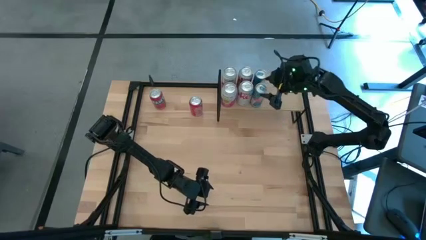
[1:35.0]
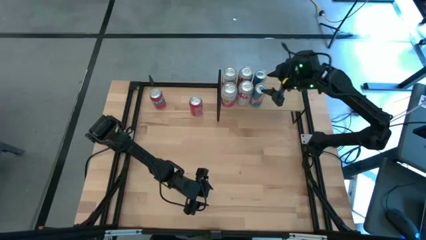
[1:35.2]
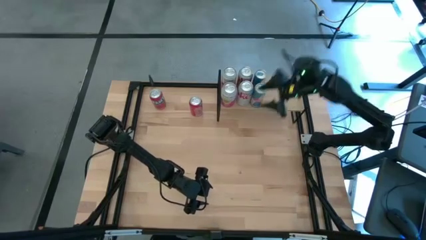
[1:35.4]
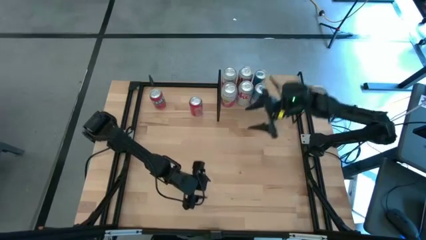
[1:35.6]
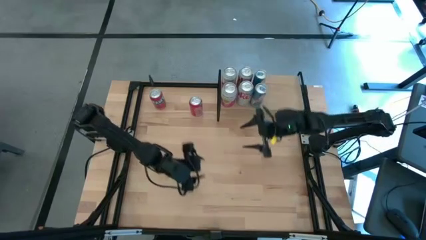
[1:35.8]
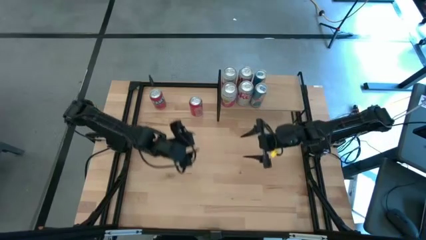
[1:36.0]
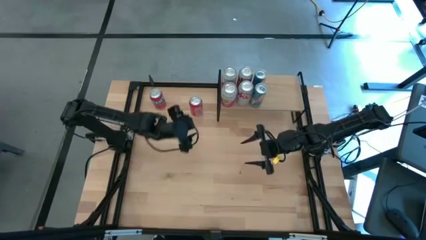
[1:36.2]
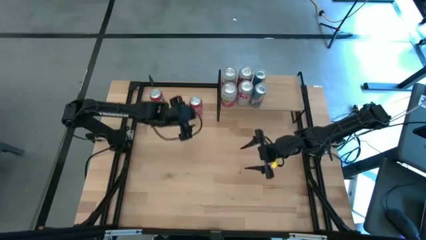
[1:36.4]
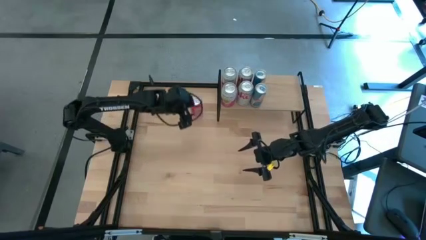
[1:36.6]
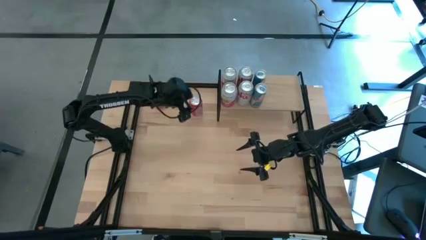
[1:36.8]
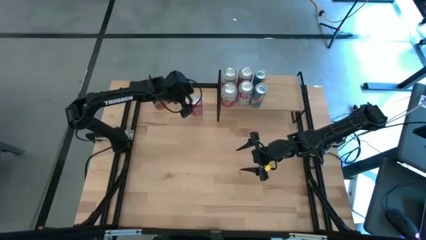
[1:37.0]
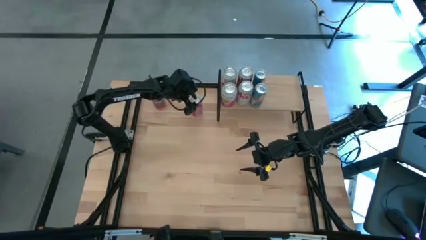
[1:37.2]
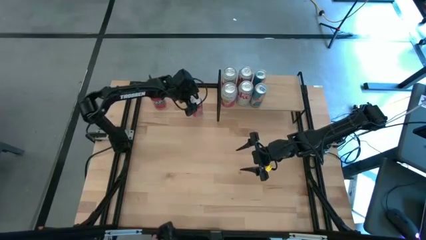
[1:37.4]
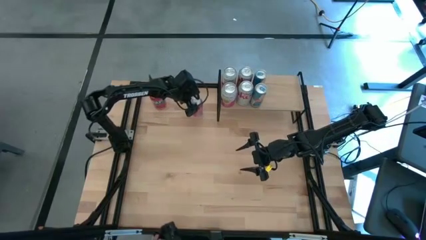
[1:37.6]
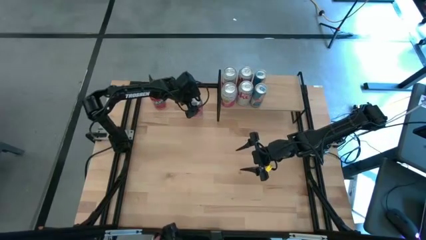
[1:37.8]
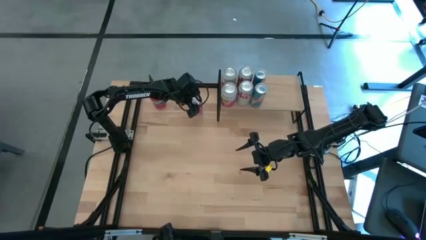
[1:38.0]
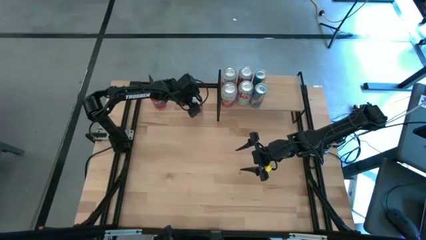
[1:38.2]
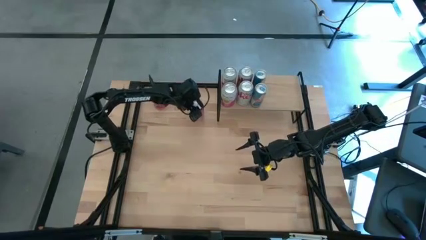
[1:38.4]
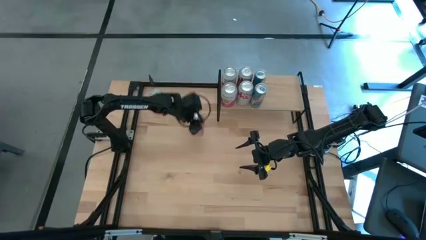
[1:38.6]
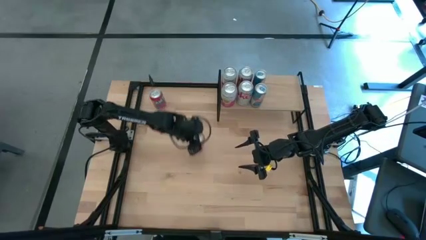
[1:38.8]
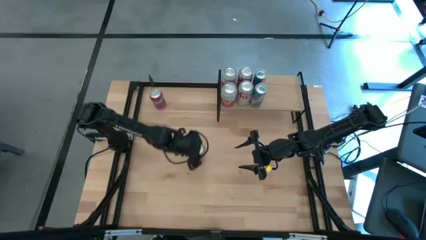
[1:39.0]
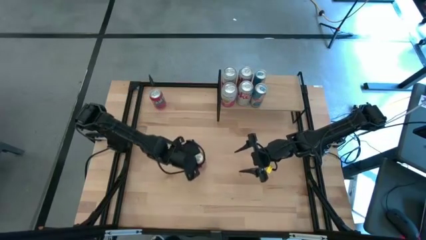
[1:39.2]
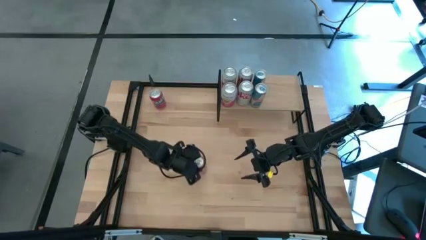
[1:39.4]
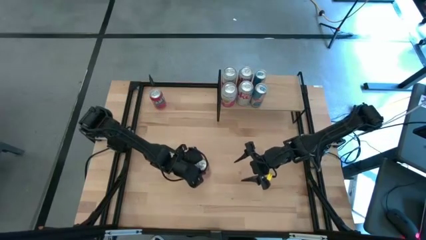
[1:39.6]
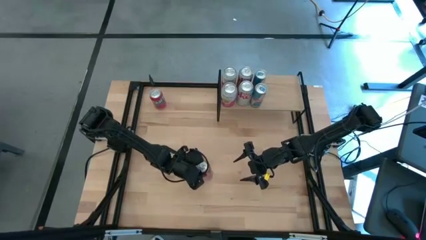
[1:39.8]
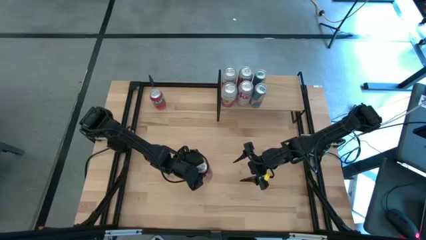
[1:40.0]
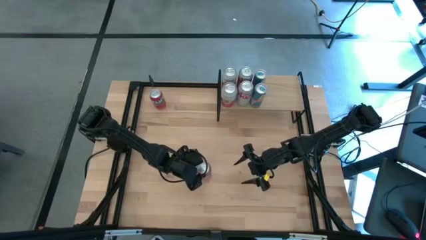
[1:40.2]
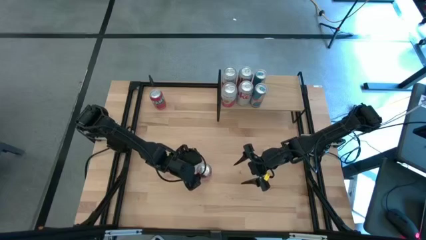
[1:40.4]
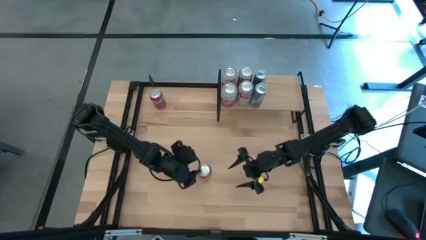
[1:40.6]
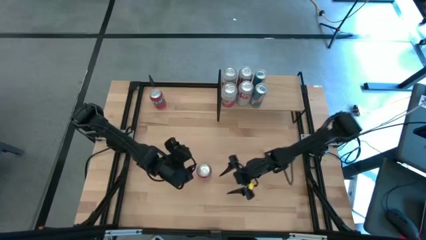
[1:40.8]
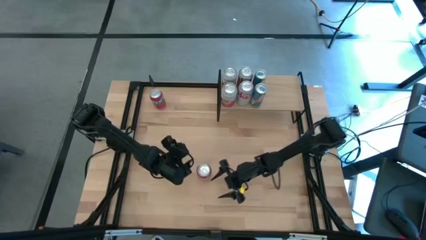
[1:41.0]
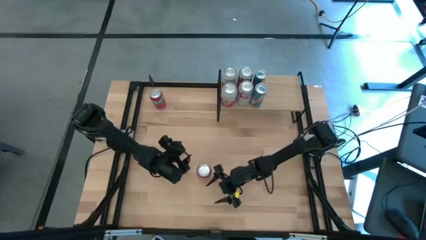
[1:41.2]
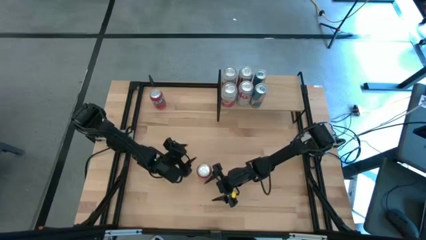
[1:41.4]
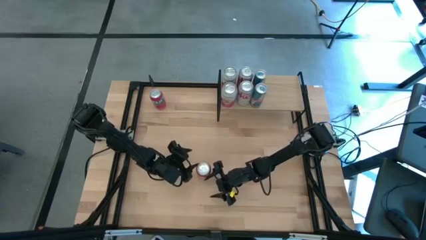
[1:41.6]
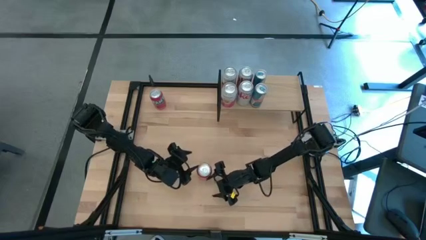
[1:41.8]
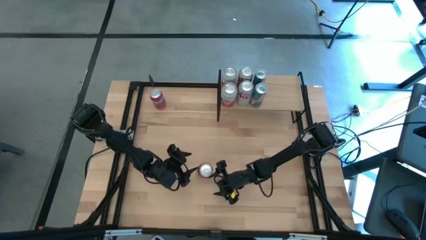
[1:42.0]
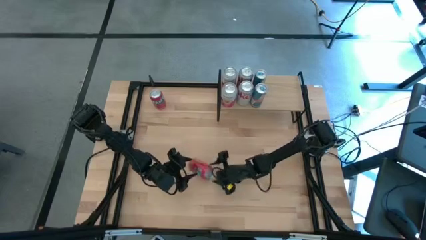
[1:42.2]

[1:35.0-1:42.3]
Task: Place canned beverage on shelf
Put the right red soda can on the shelf

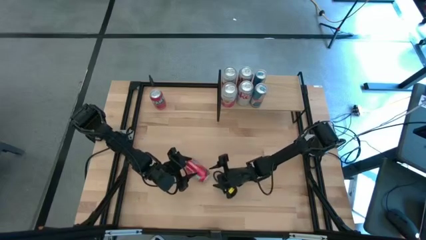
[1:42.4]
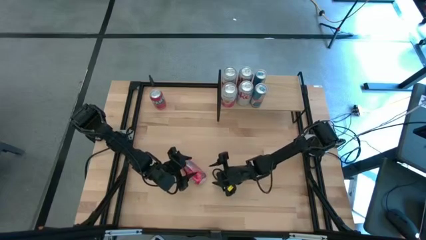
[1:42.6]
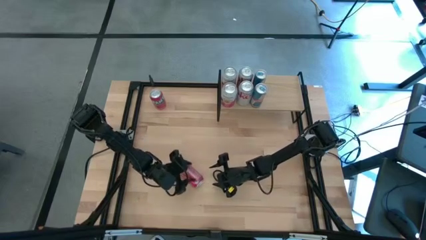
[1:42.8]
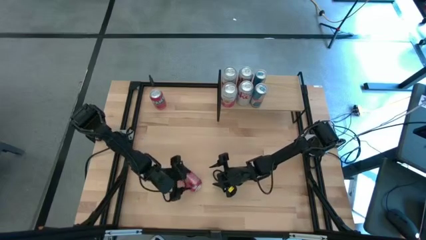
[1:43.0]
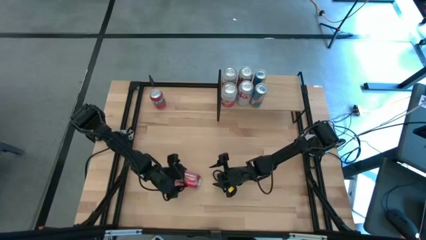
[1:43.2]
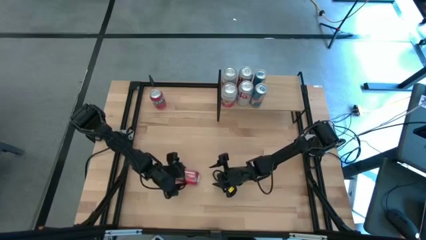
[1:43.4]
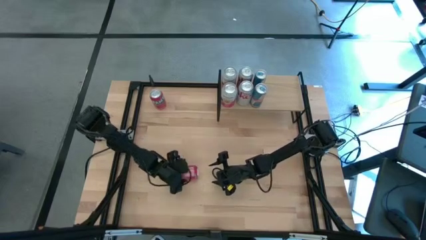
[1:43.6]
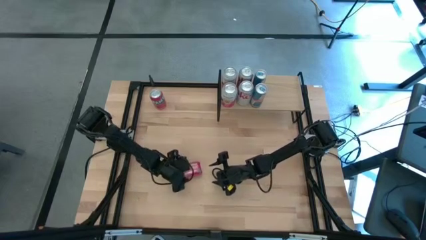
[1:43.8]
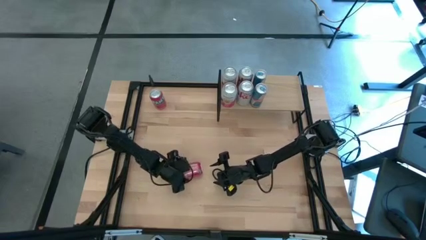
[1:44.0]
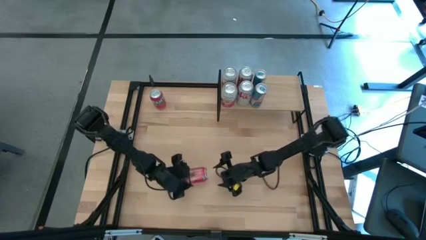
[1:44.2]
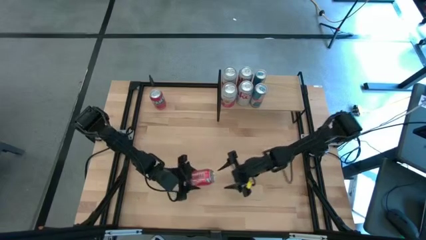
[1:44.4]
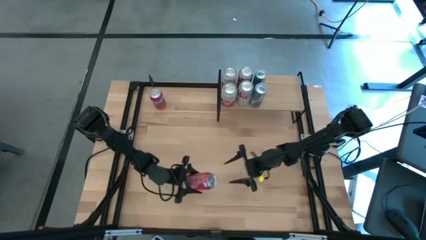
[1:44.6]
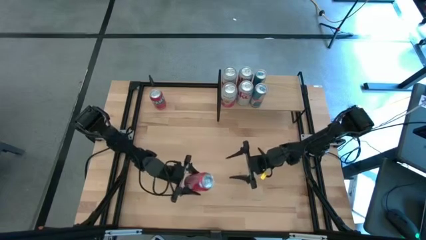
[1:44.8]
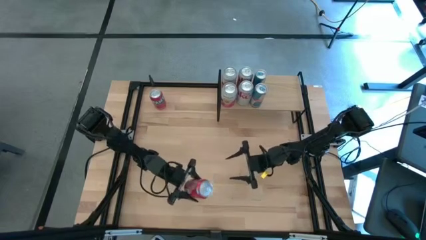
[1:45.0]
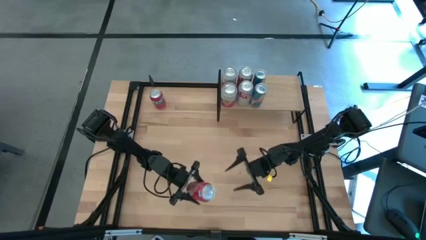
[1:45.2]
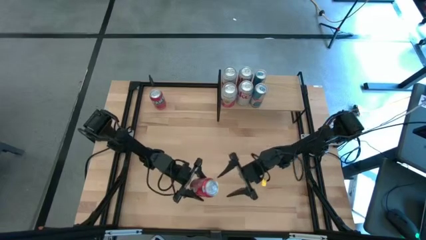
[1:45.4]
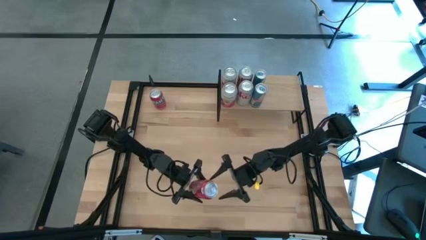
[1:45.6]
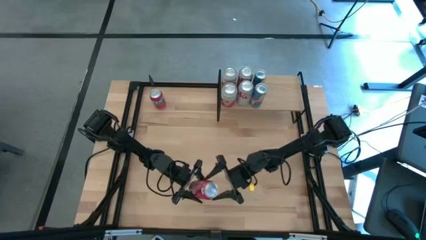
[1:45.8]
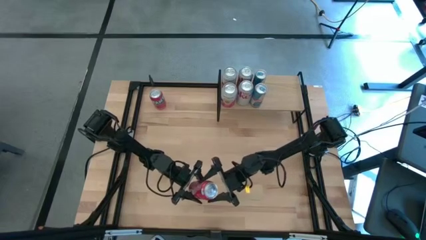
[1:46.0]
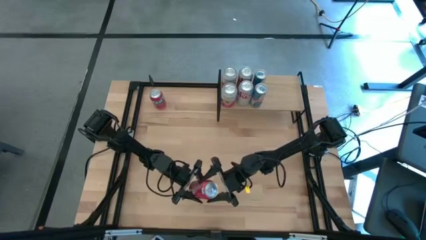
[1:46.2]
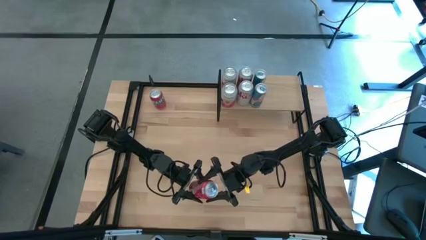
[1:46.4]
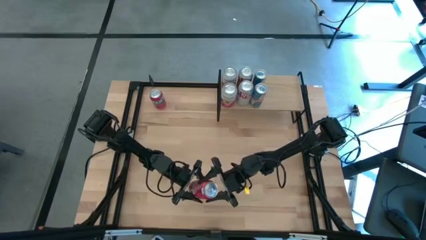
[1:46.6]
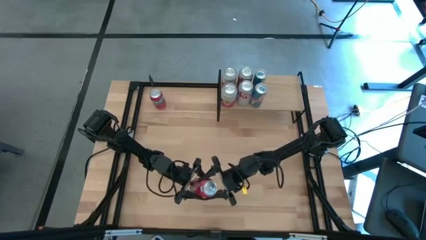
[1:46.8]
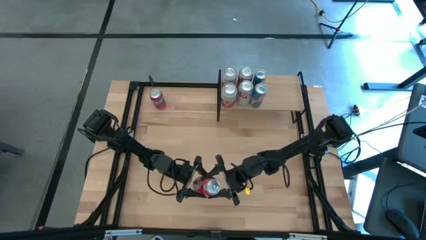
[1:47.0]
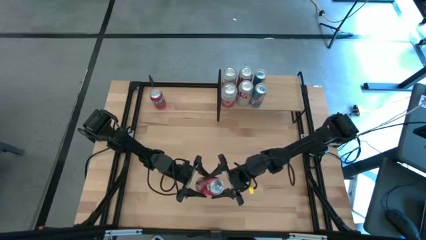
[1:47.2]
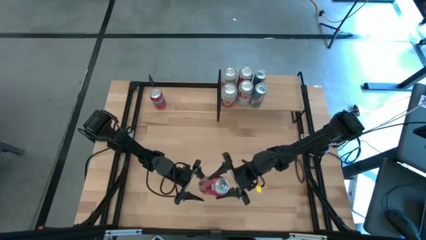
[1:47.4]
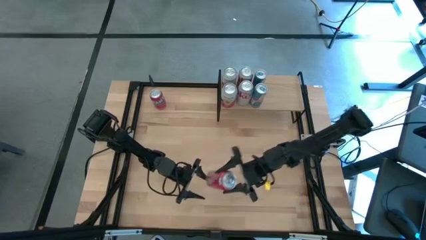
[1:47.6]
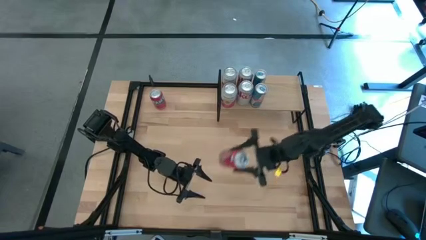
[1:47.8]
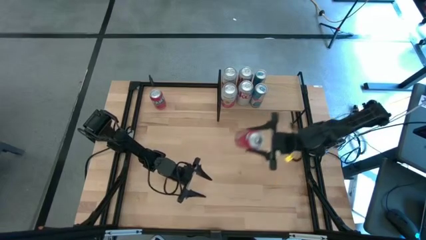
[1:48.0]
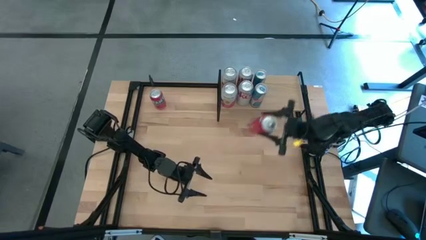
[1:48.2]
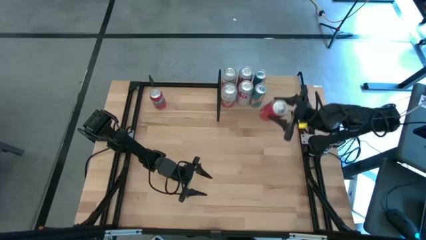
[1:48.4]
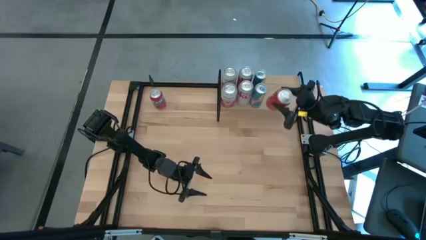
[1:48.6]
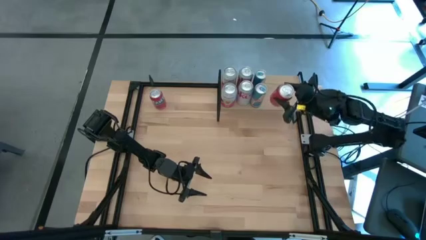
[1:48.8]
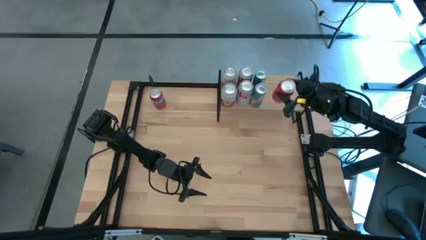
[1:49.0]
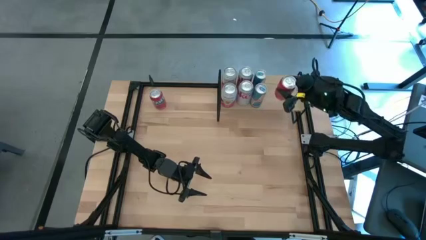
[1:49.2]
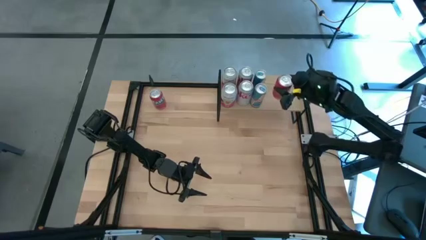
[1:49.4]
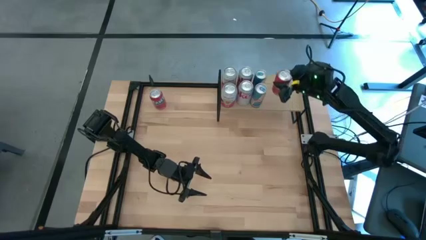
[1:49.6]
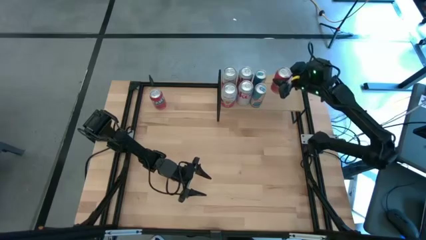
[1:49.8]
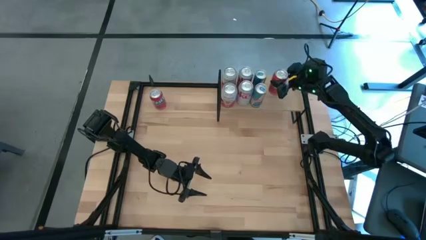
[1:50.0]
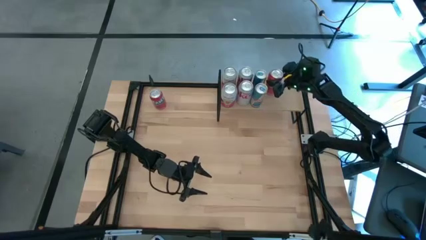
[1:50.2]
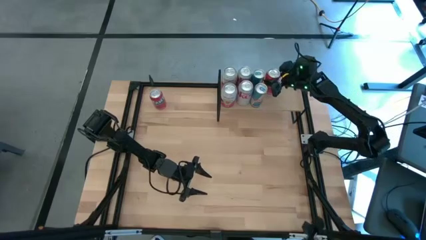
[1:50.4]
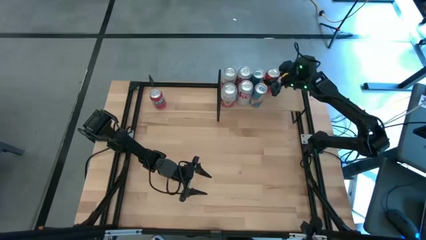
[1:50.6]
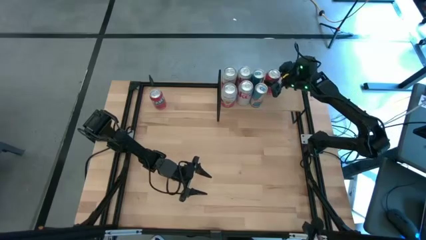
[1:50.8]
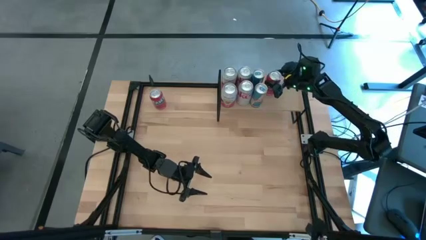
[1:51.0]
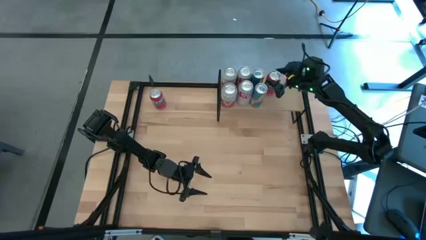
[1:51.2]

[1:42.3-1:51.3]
Put the right red soda can on the shelf
